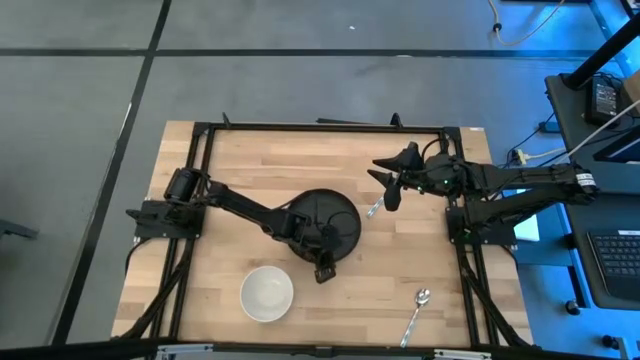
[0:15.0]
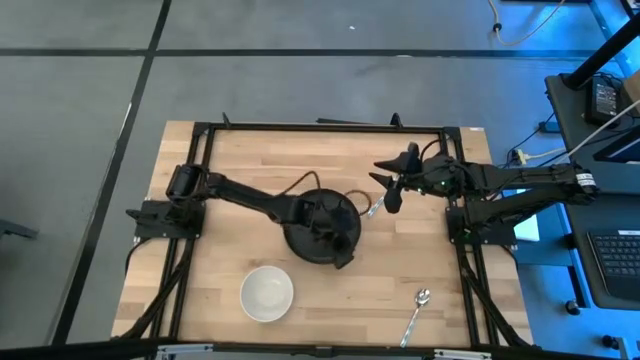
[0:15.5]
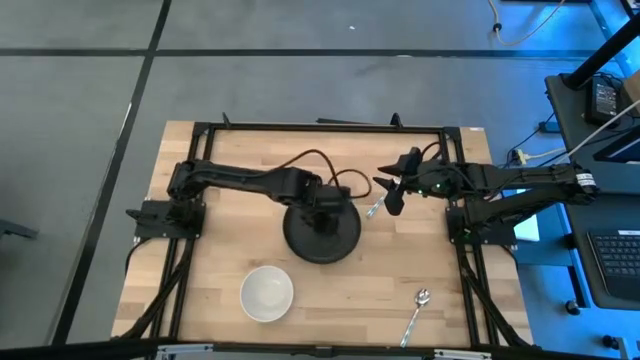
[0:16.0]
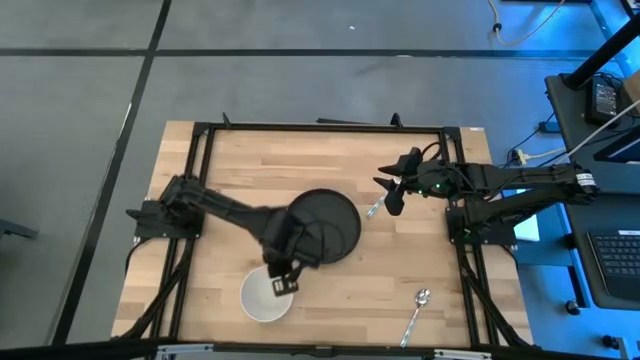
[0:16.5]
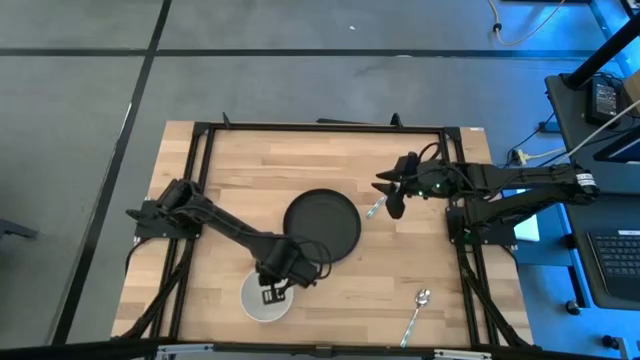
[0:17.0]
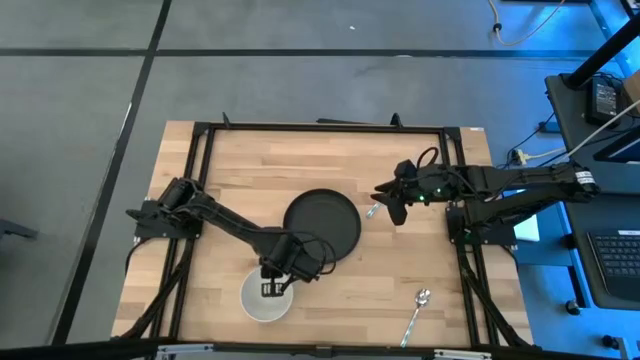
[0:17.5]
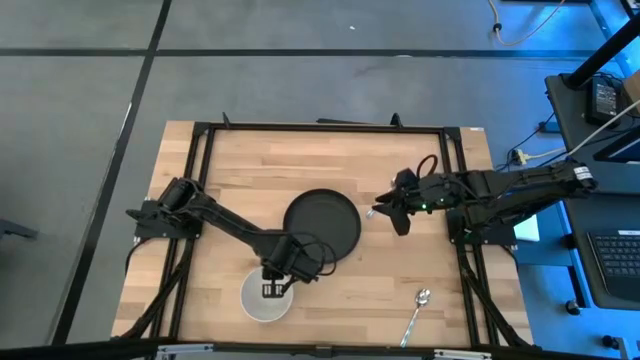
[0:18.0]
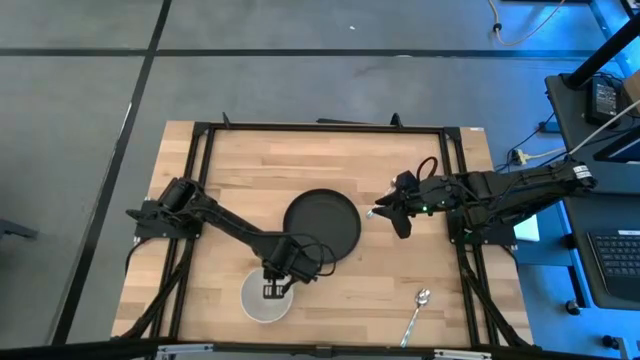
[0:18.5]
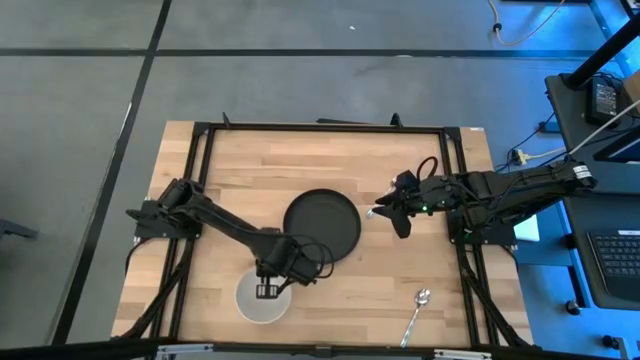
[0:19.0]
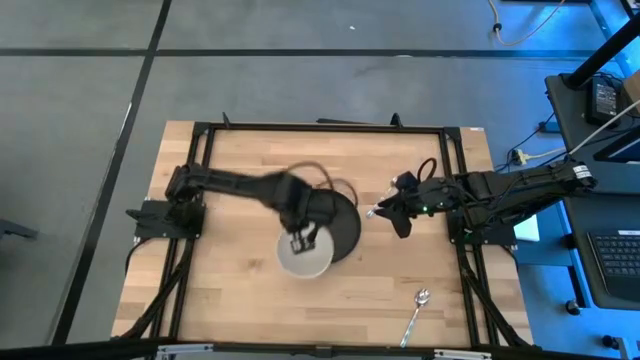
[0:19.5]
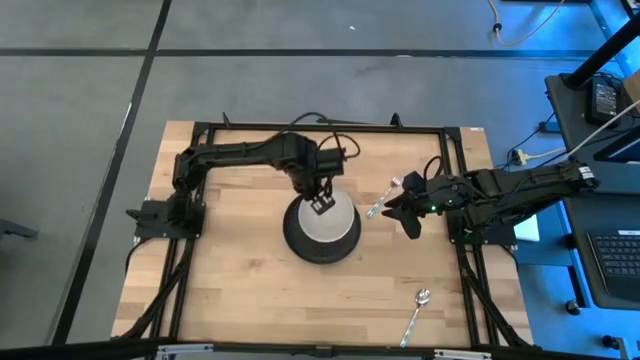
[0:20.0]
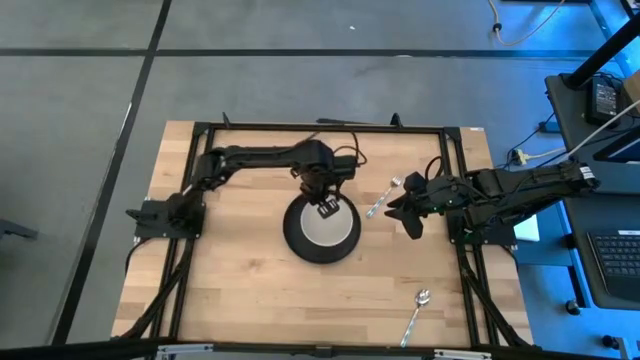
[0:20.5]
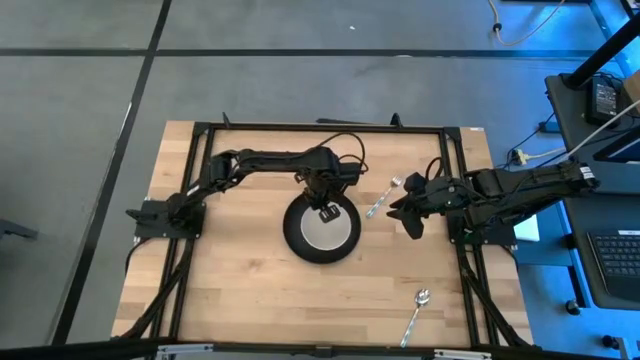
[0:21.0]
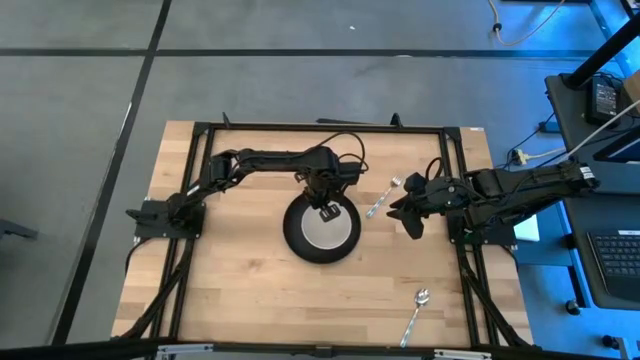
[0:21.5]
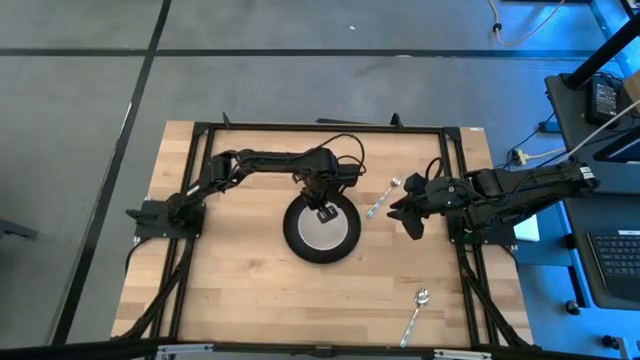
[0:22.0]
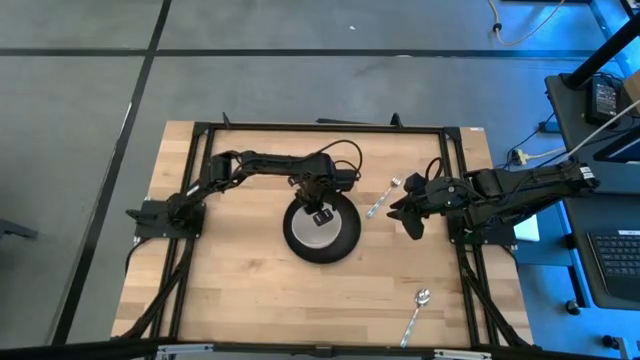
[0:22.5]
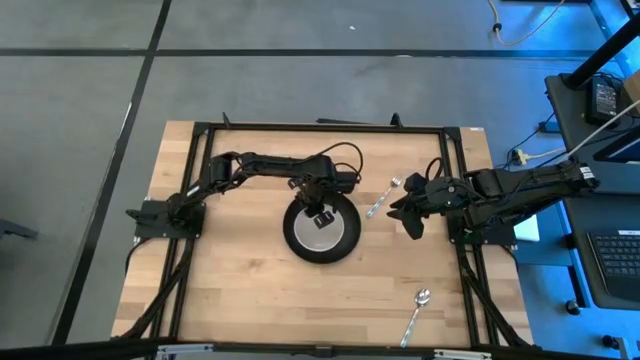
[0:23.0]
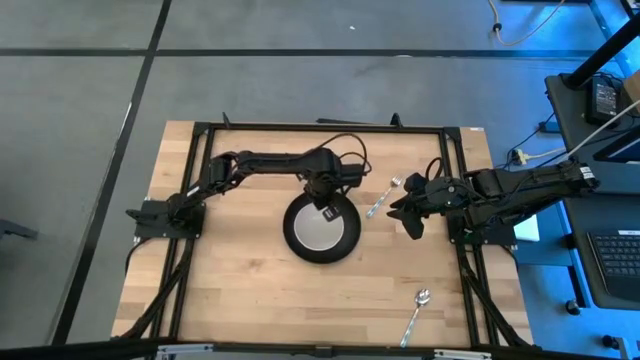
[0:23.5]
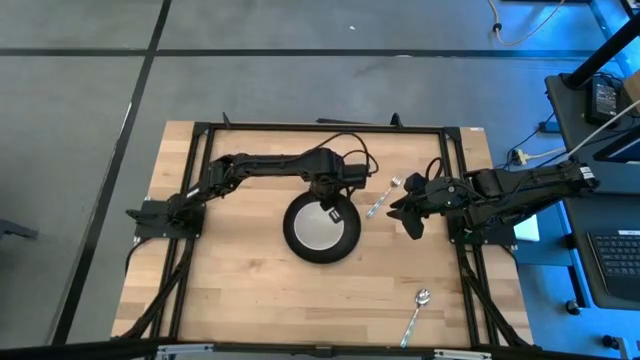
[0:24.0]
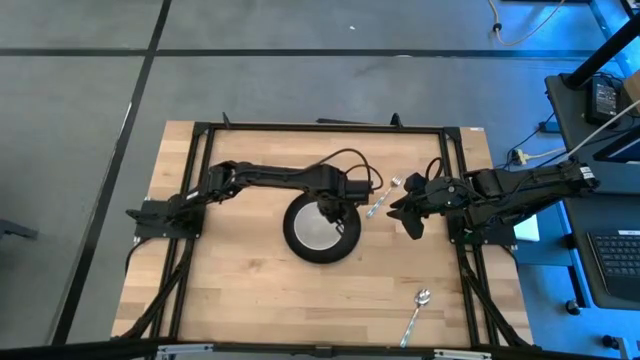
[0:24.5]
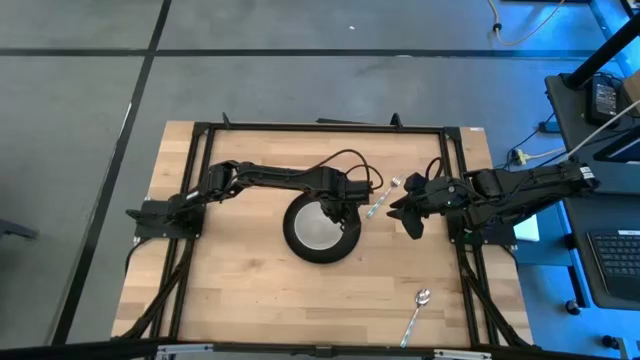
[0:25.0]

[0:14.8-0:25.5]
Task: Set table place
Put the white bowl on top of the black plate

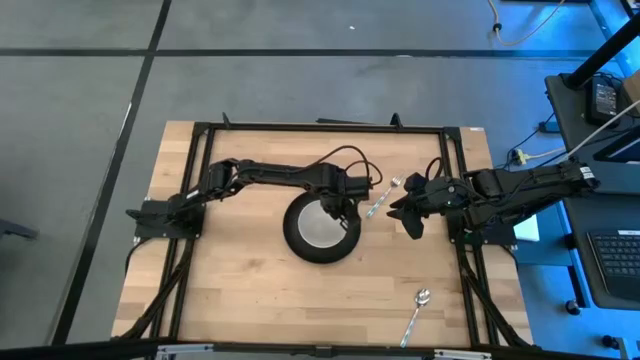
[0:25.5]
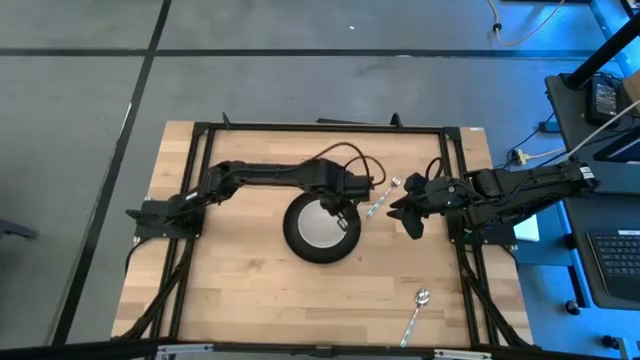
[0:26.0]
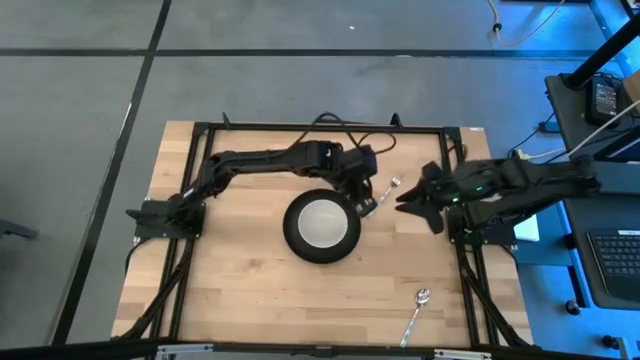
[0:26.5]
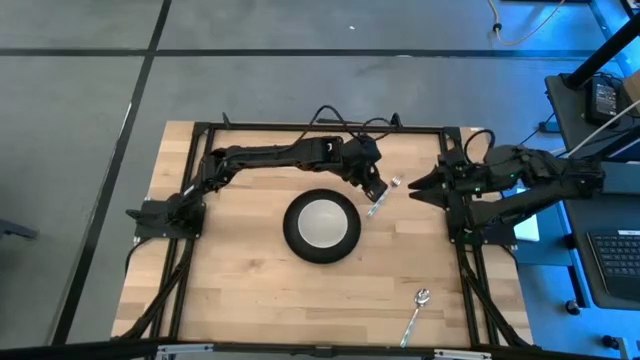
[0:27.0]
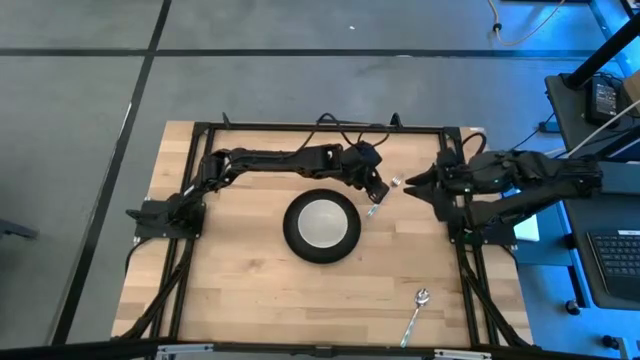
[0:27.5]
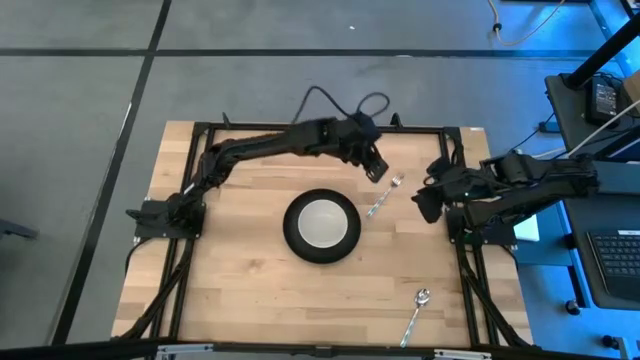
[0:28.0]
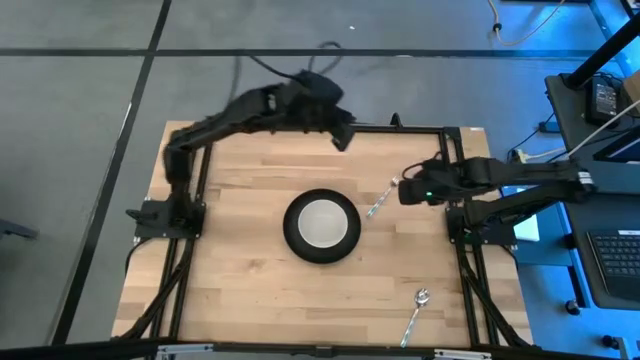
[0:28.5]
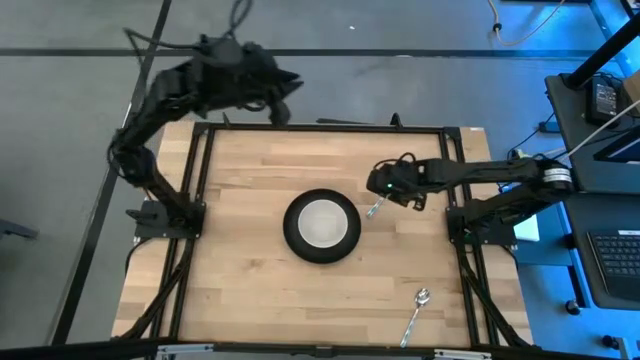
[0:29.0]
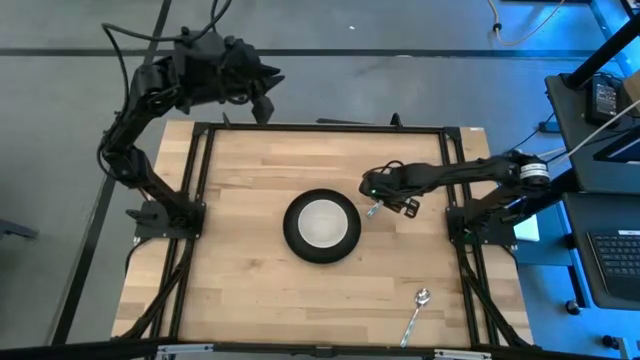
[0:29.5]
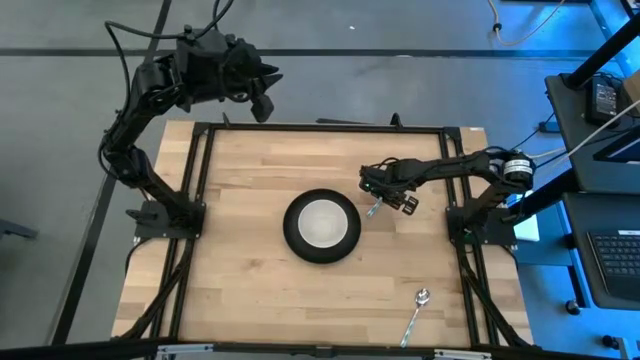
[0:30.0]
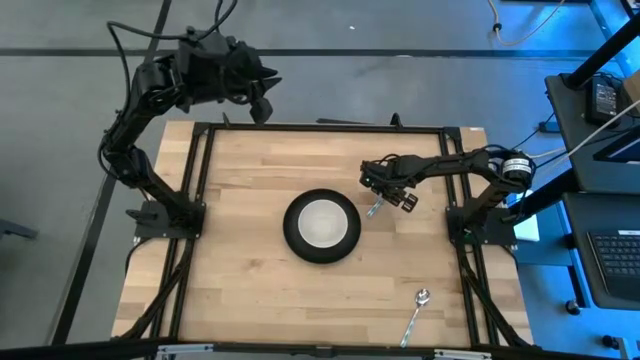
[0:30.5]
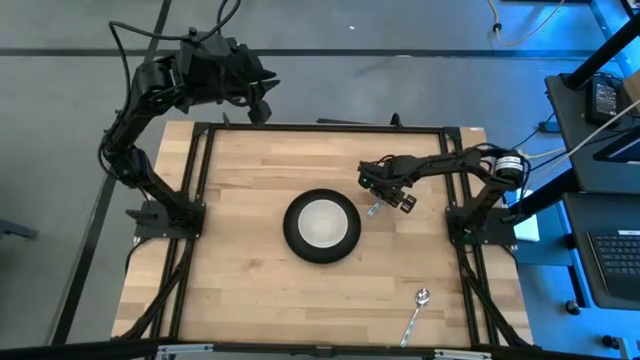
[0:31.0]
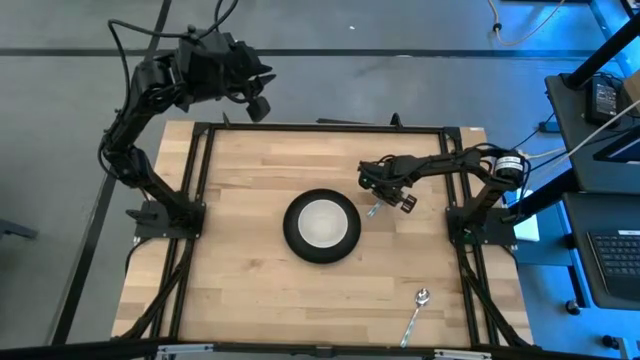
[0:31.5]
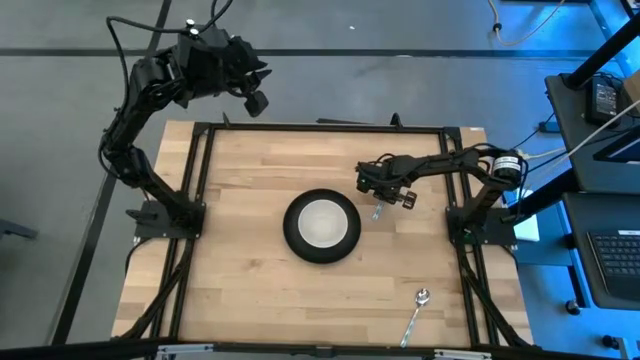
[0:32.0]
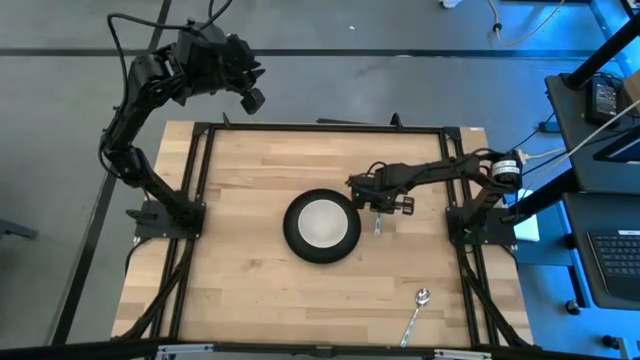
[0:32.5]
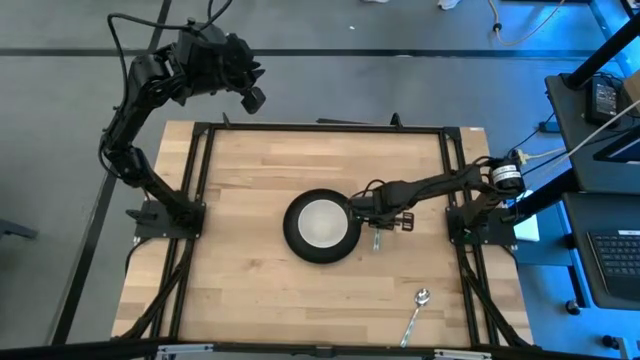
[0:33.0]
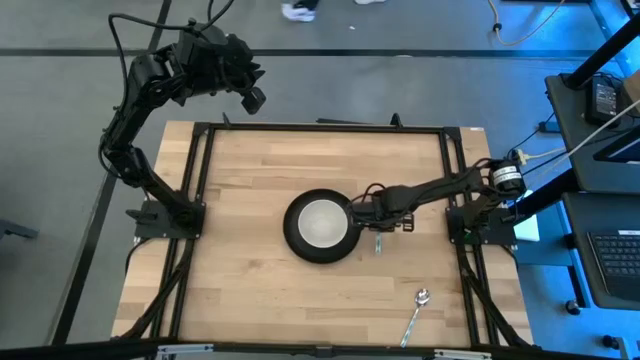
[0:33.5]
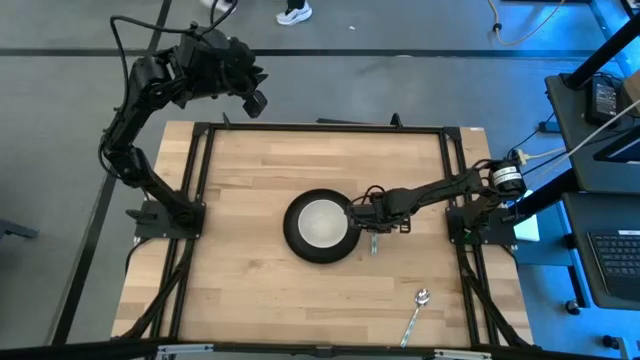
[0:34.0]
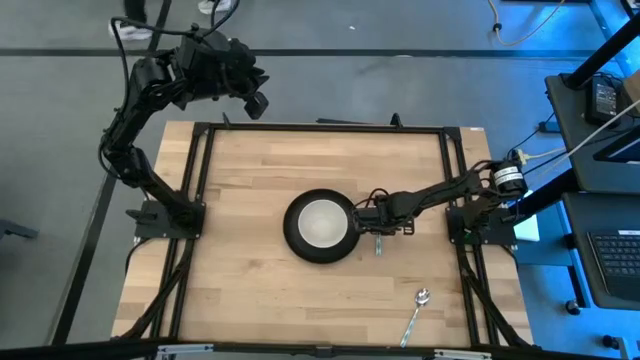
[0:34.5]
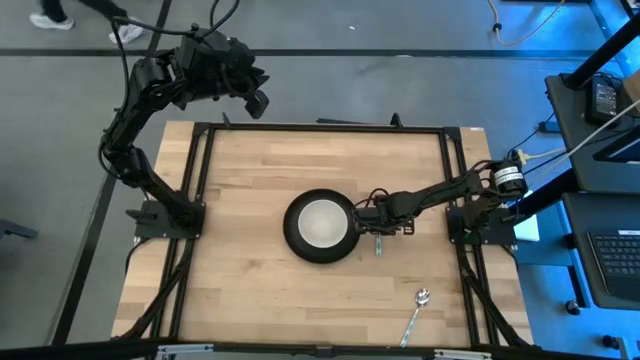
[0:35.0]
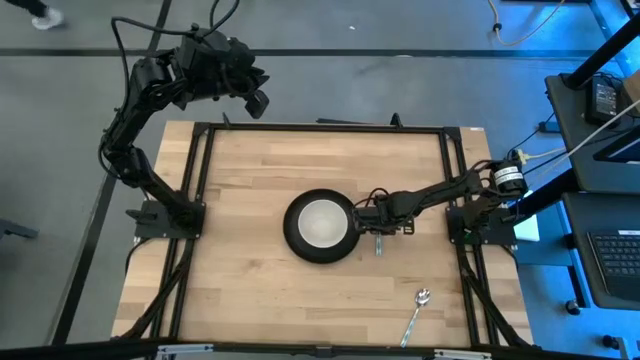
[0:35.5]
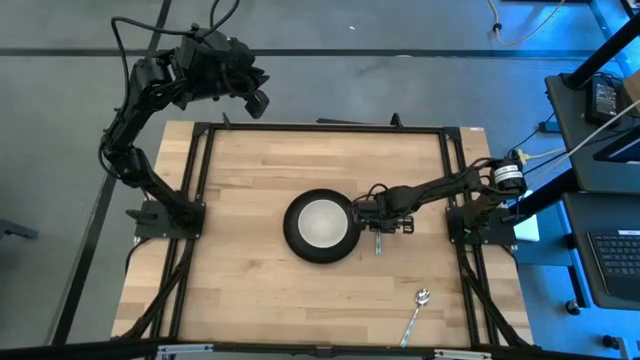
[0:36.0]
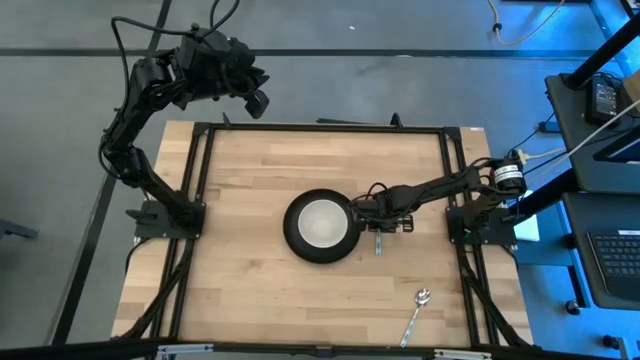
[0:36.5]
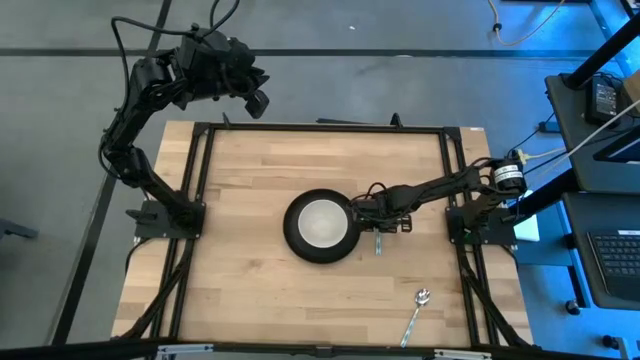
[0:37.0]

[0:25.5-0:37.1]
Put the blue patterned fork to the right of the black plate on the table
